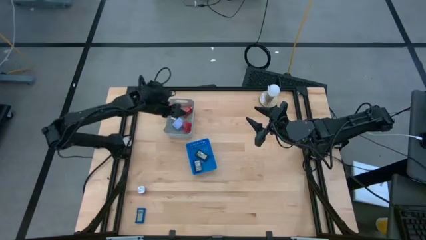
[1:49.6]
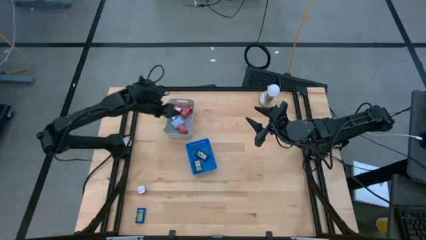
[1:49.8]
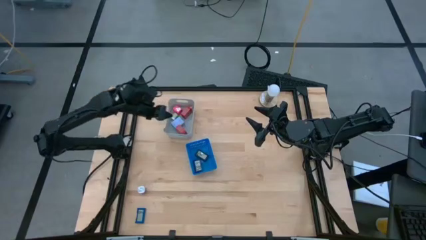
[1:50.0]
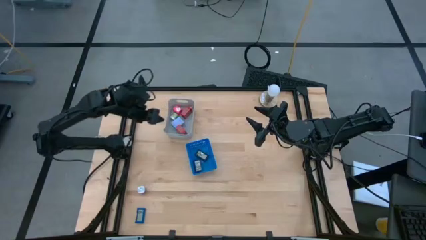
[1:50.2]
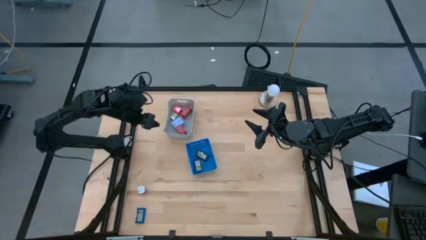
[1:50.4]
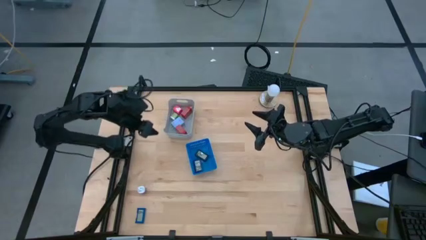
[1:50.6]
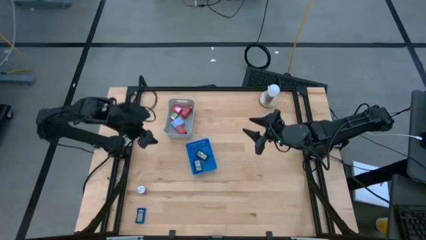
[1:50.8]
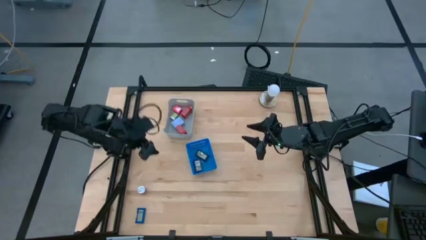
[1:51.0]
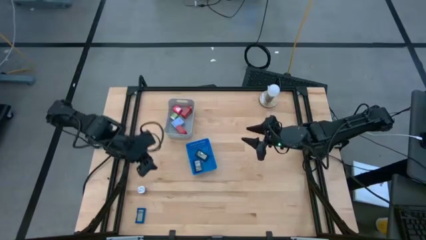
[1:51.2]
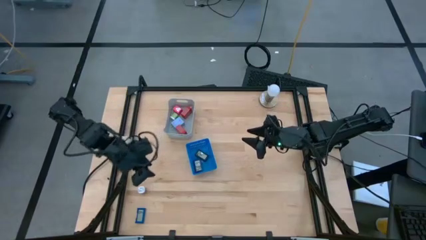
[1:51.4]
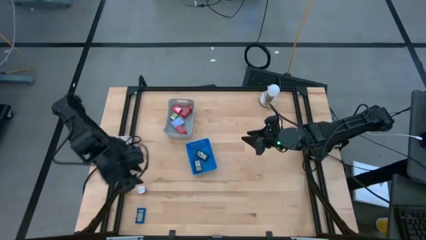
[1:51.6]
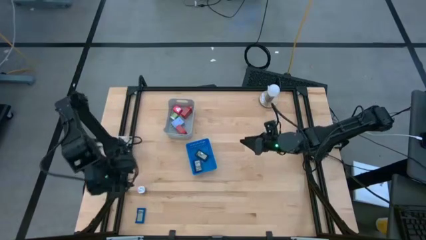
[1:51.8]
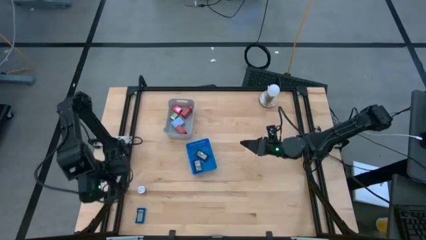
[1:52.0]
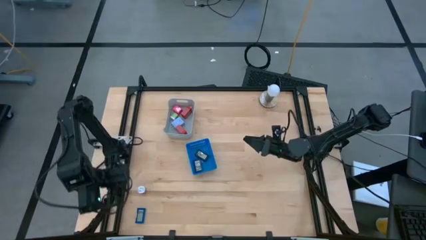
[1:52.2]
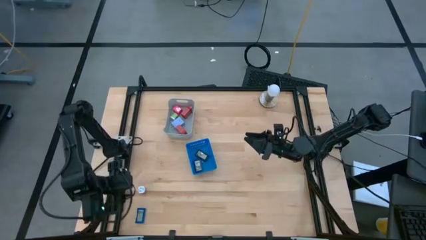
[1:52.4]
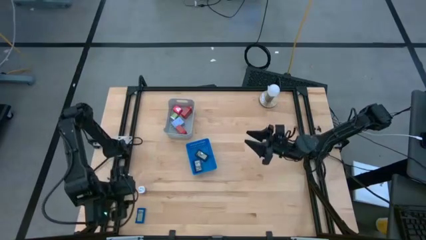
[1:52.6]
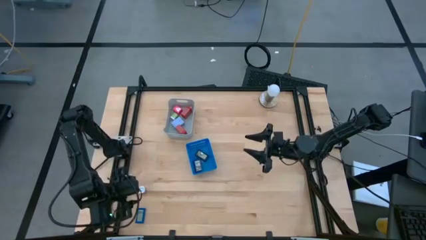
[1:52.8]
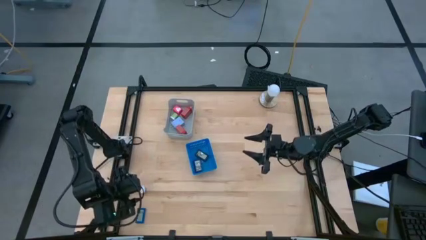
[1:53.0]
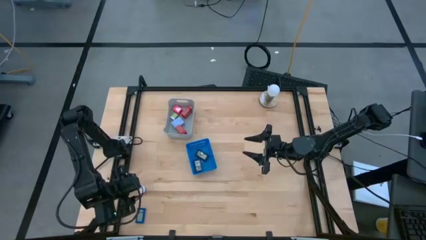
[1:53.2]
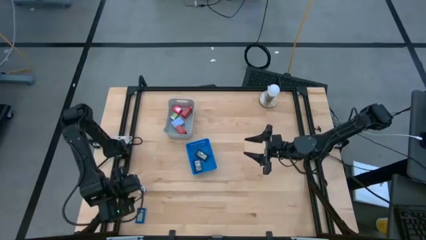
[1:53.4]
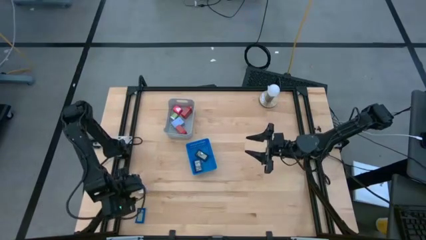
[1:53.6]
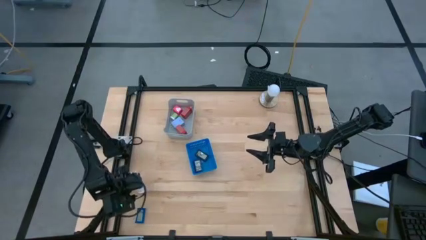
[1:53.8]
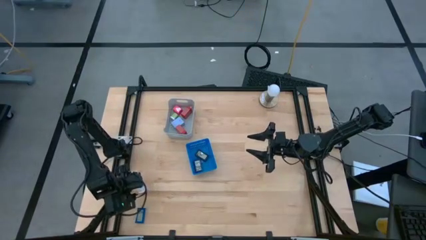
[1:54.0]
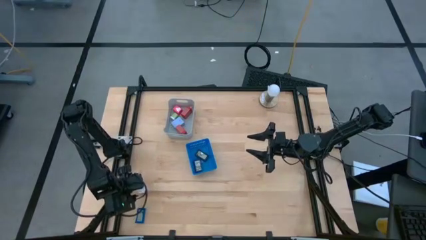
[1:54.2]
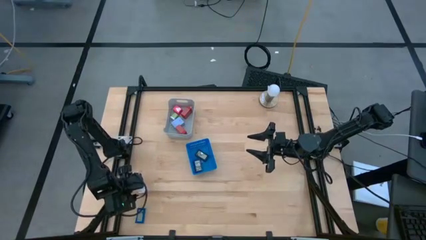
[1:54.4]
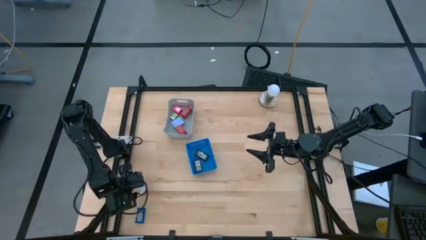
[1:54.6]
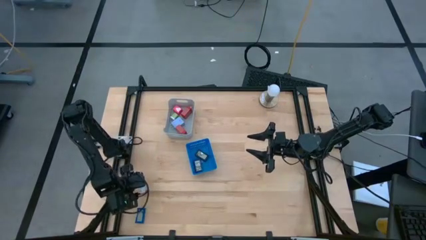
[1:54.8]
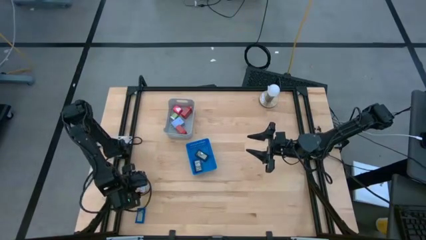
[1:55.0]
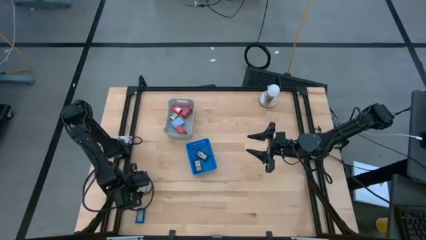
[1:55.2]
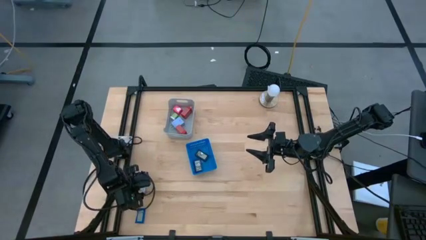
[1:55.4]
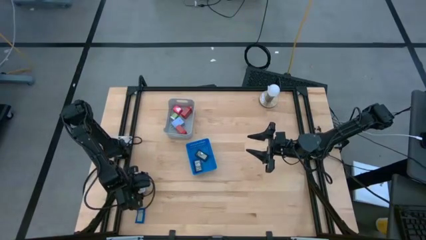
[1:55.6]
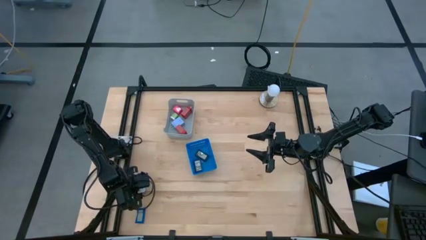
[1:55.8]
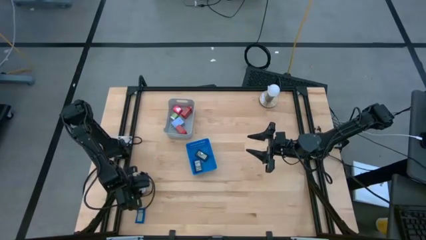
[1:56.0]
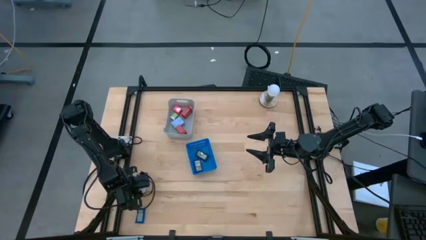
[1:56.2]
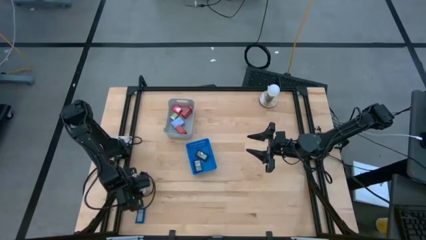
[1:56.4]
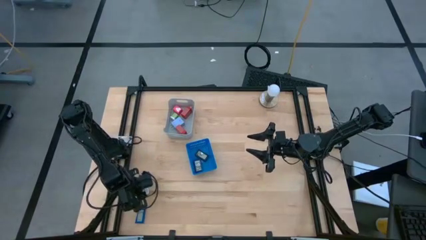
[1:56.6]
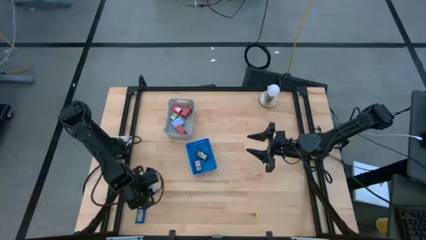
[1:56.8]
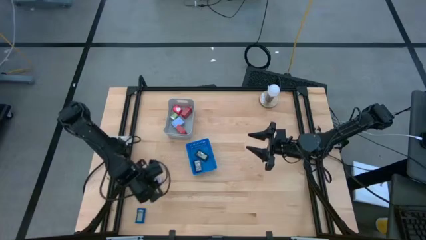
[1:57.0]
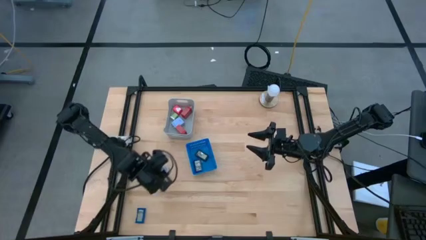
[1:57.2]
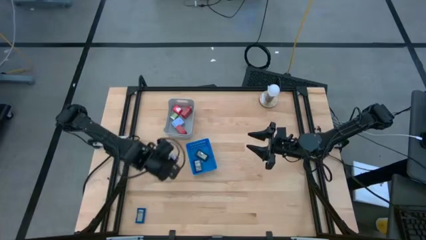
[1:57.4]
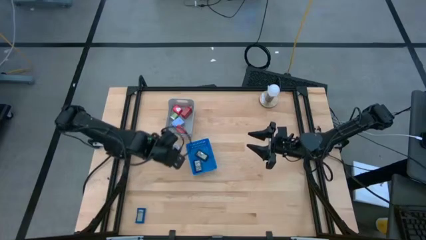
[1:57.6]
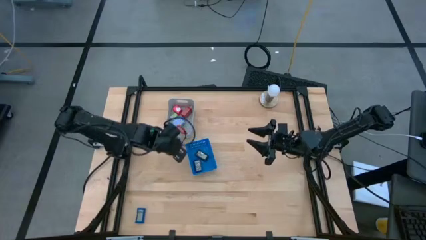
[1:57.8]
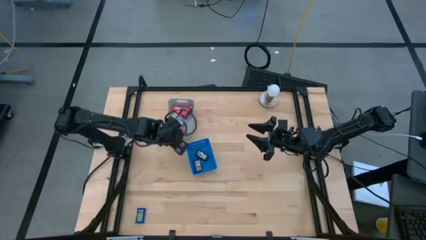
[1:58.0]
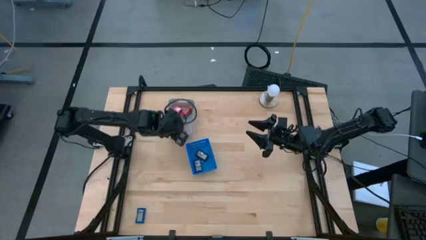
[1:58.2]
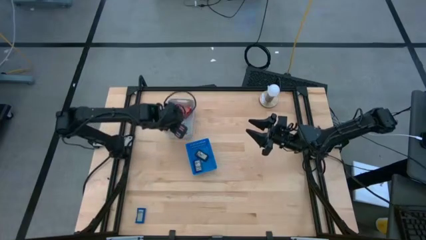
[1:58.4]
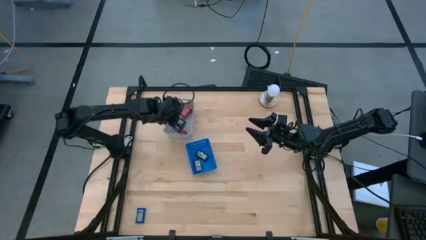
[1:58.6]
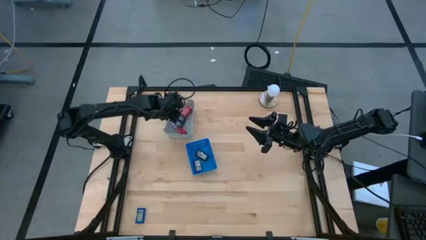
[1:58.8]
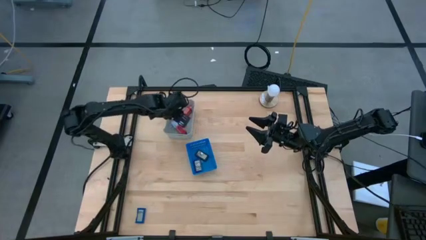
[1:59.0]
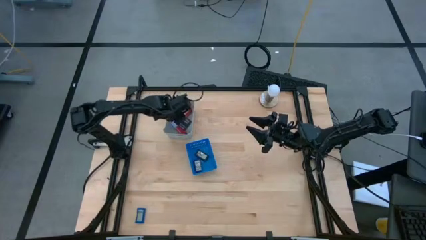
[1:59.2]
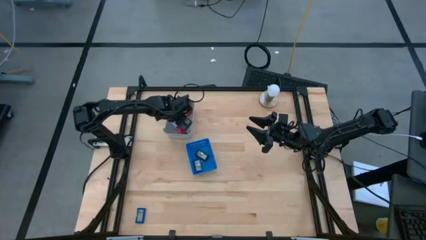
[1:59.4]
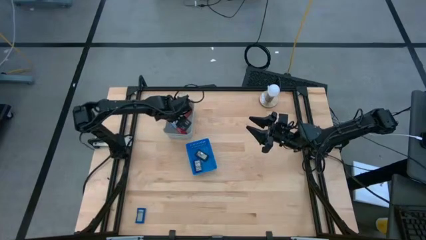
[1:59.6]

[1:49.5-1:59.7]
Task: Pick & Place Office items
Put the violet charger adapter into the gray bin

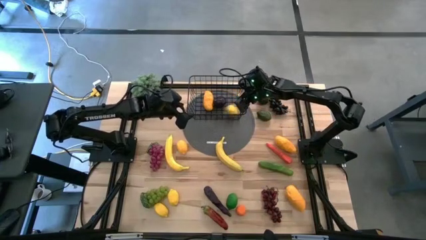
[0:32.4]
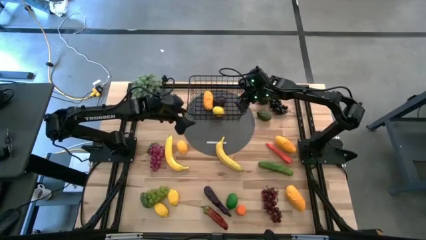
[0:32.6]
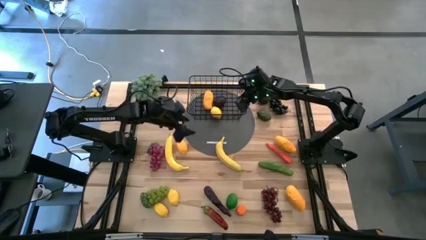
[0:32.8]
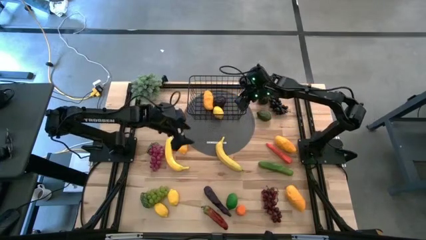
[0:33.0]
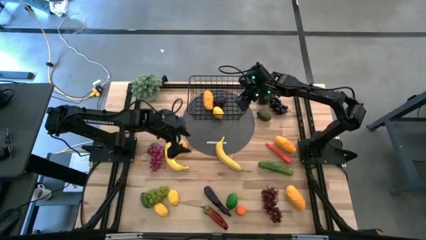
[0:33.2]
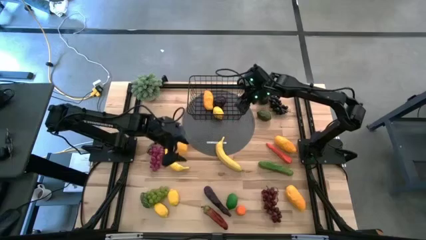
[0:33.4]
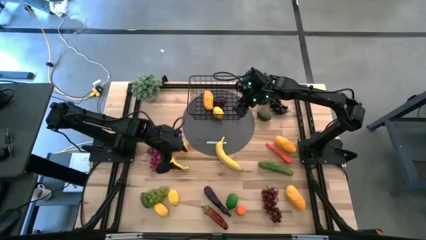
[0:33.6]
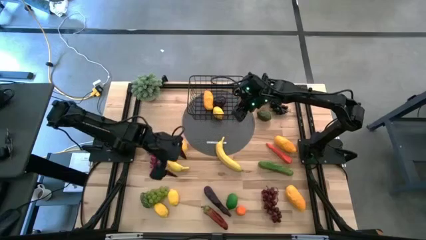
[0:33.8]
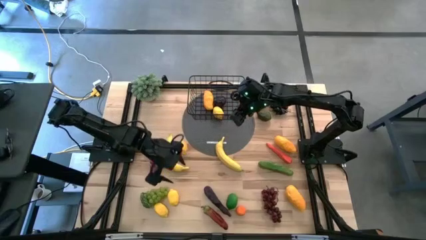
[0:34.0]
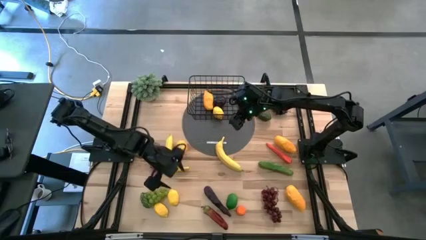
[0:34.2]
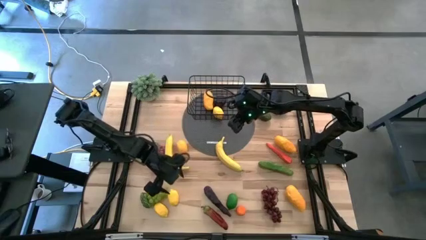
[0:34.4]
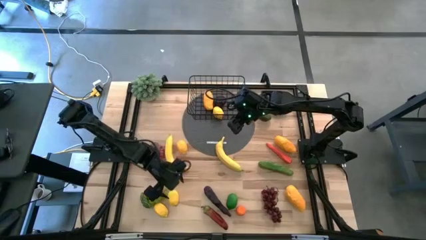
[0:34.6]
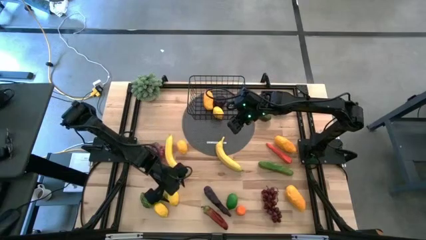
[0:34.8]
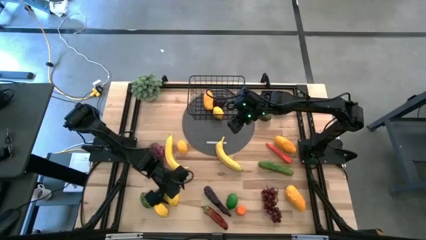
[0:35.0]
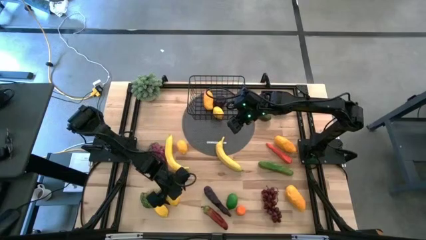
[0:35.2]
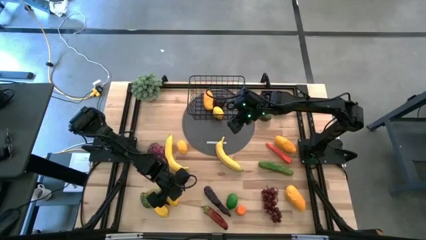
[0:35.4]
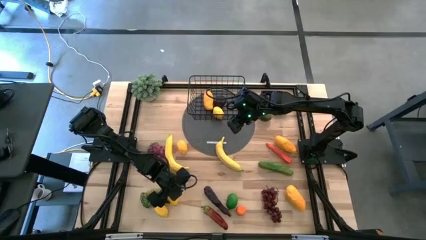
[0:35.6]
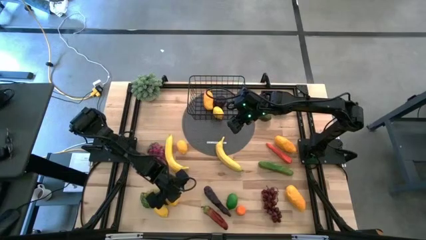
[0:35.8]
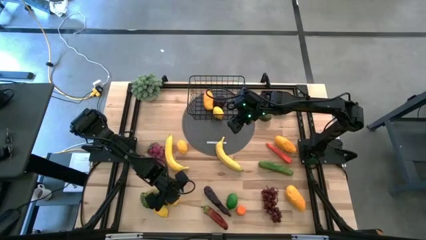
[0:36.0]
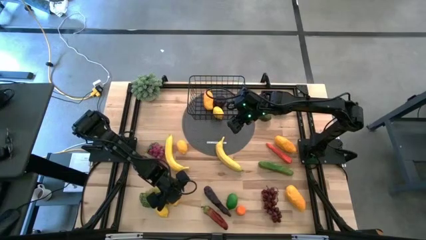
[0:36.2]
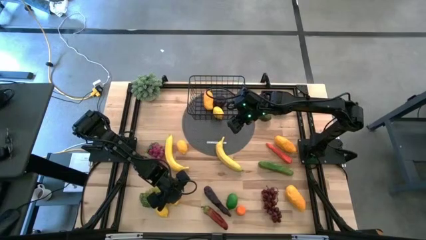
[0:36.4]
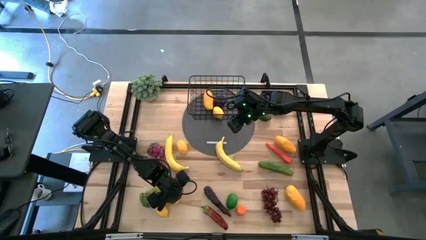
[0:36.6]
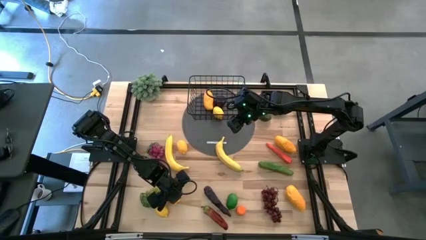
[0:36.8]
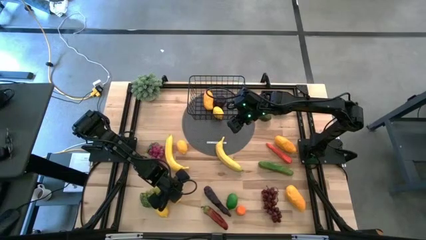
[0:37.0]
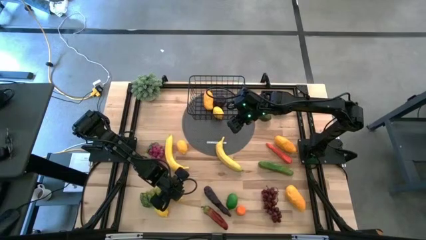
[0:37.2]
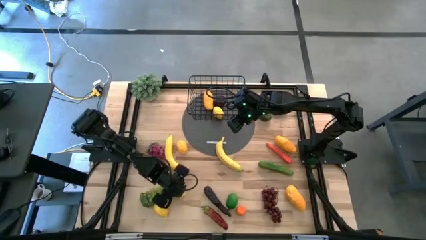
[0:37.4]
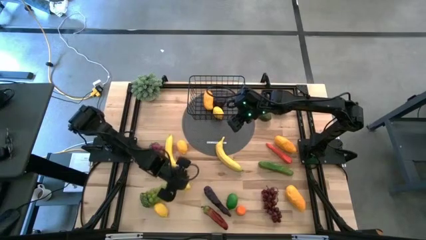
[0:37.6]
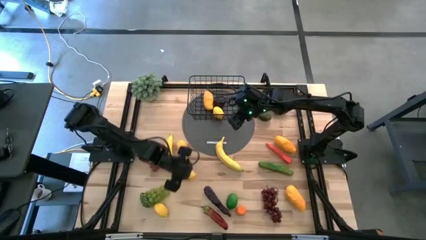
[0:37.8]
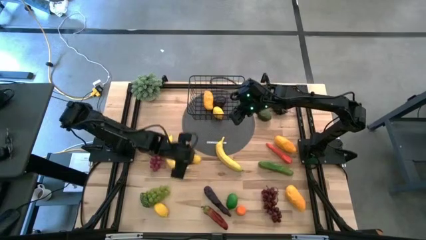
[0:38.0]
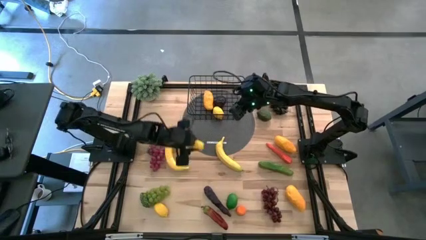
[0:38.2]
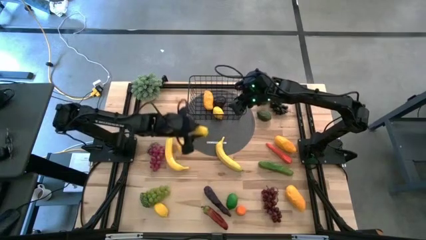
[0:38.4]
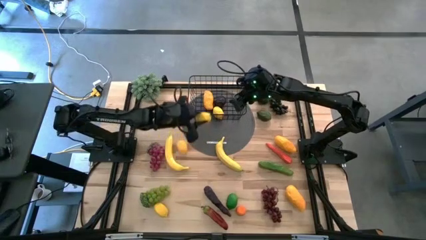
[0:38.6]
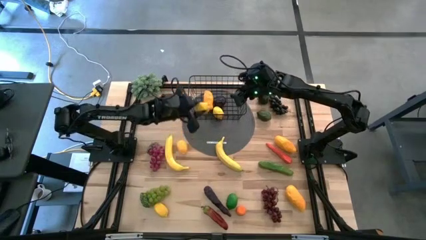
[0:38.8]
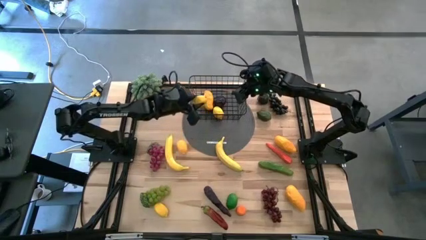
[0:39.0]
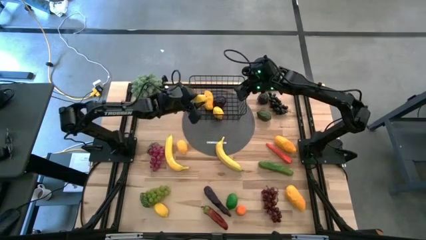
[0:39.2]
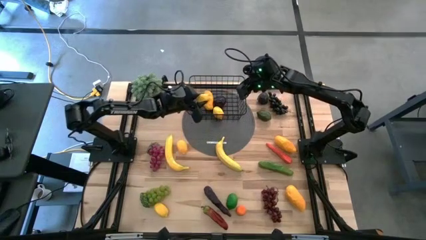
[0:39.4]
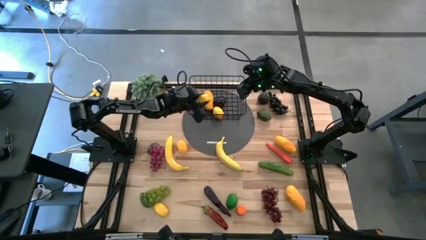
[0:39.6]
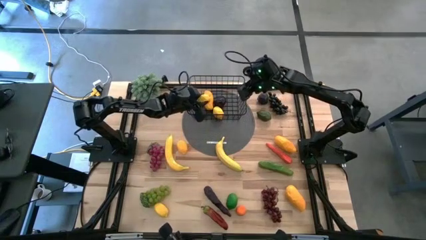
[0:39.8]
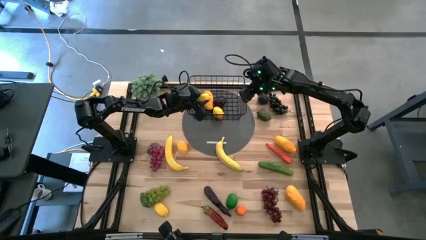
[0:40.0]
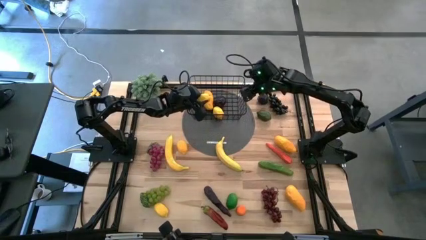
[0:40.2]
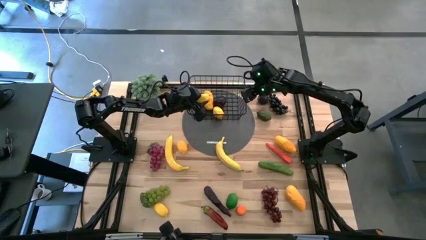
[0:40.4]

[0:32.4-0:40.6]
Task: Build produce basket
Put the yellow lemon into the black wire basket
